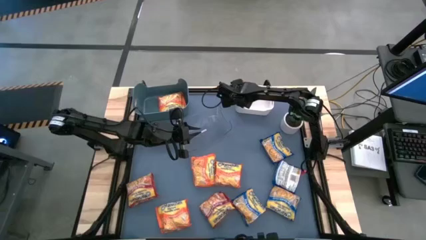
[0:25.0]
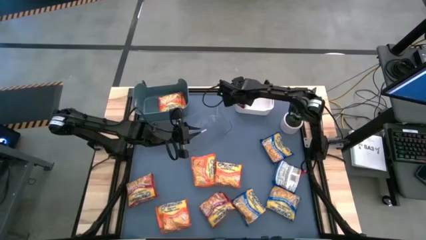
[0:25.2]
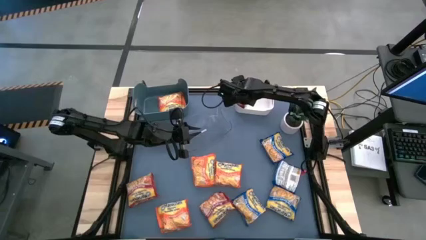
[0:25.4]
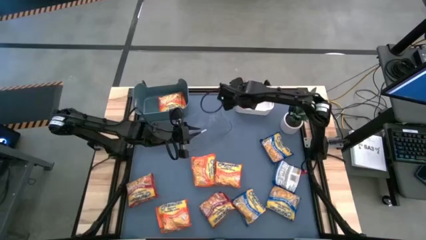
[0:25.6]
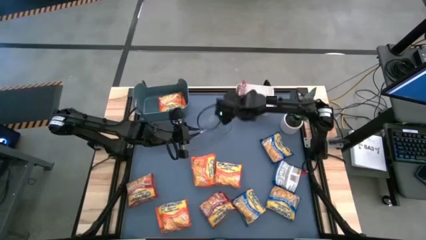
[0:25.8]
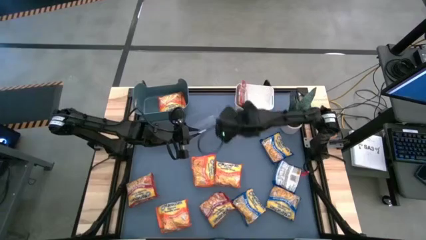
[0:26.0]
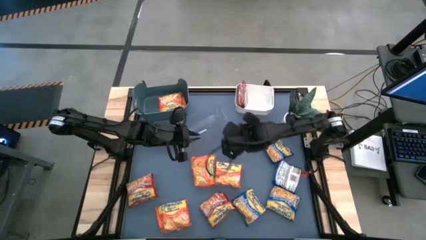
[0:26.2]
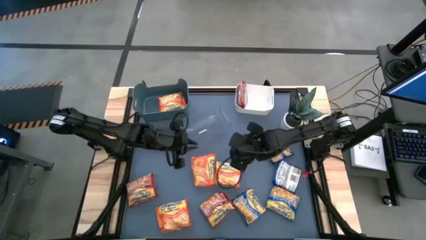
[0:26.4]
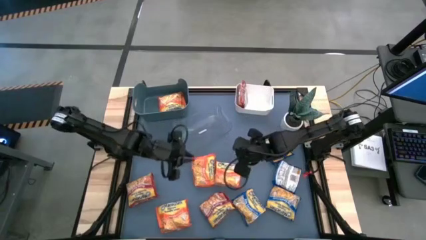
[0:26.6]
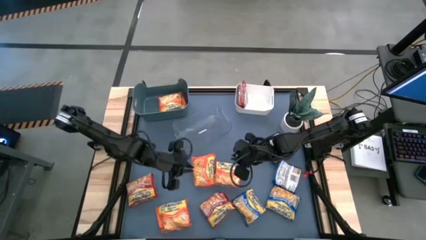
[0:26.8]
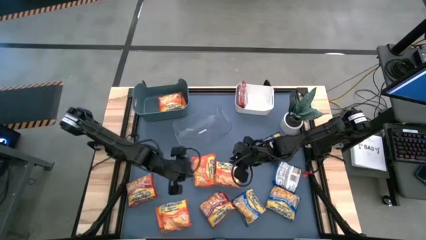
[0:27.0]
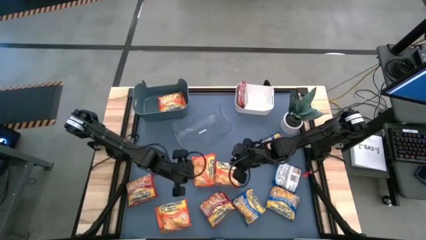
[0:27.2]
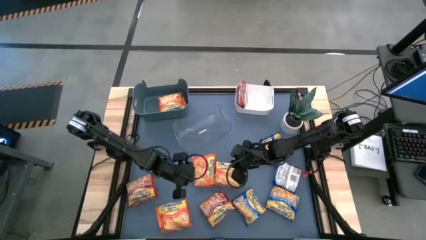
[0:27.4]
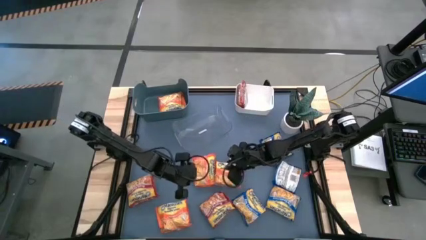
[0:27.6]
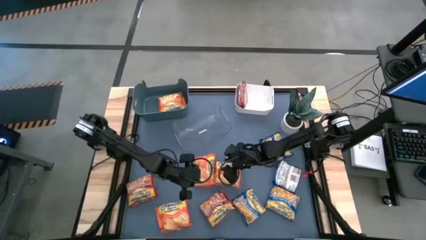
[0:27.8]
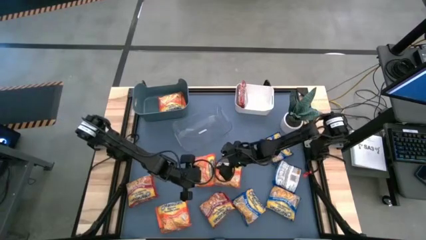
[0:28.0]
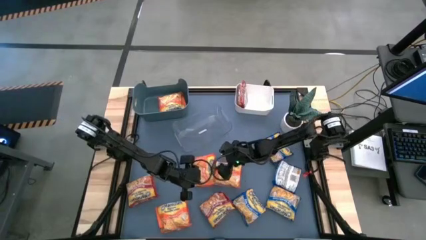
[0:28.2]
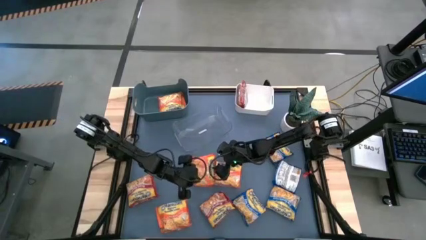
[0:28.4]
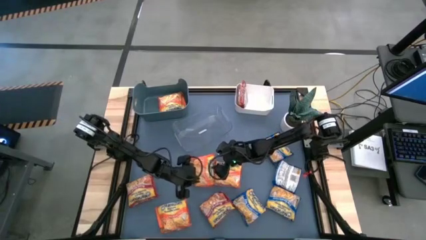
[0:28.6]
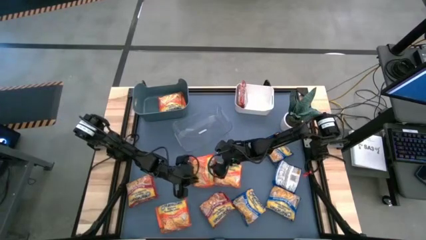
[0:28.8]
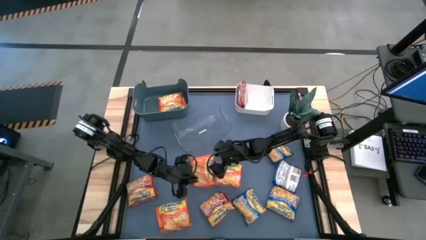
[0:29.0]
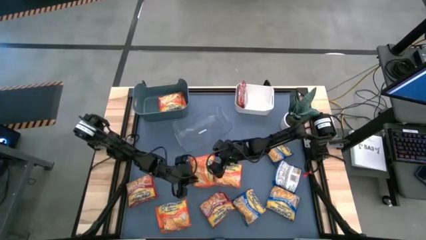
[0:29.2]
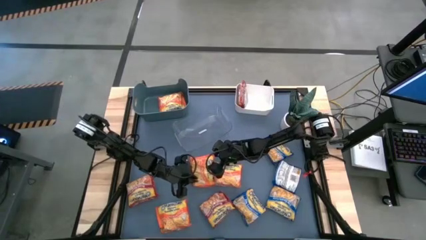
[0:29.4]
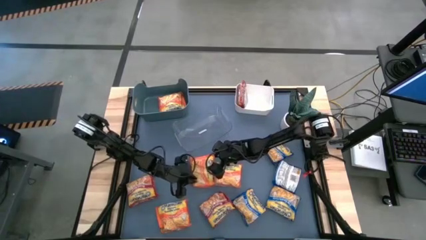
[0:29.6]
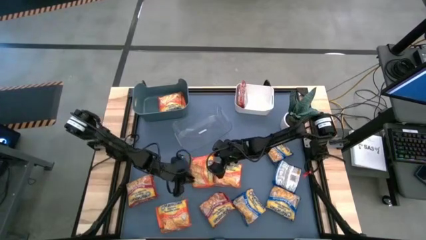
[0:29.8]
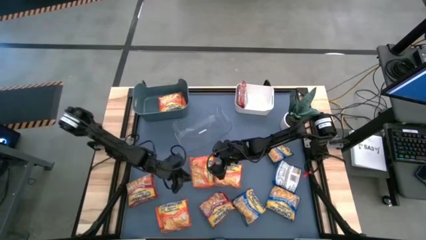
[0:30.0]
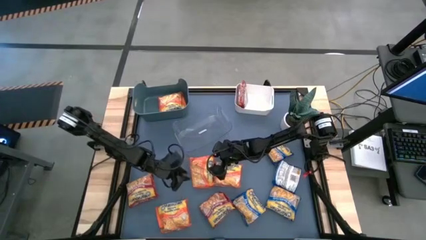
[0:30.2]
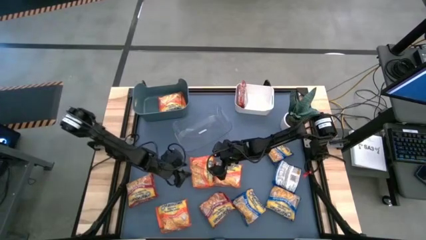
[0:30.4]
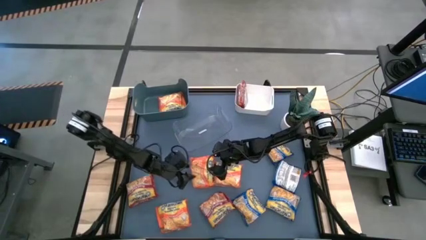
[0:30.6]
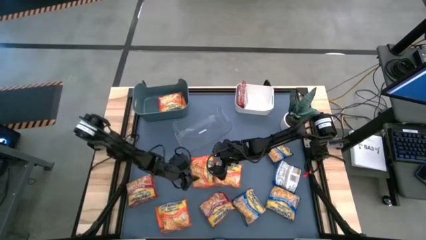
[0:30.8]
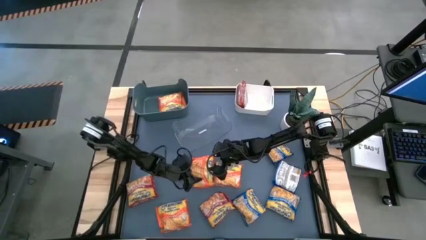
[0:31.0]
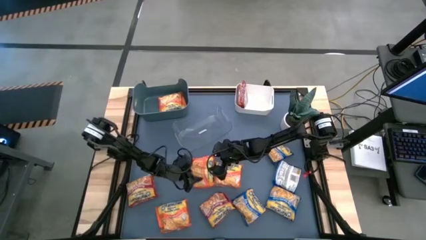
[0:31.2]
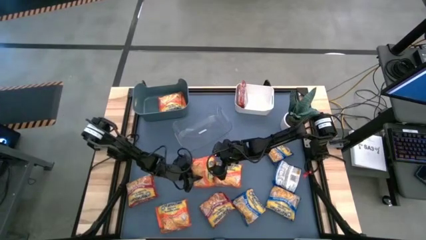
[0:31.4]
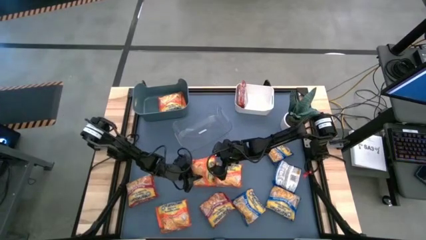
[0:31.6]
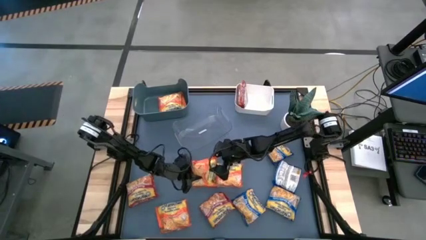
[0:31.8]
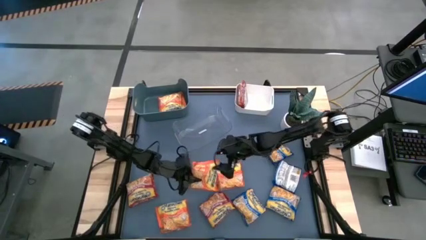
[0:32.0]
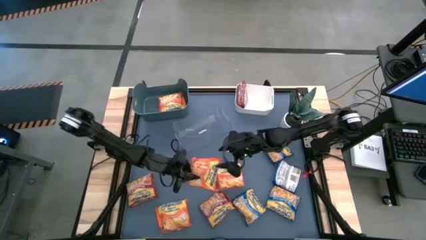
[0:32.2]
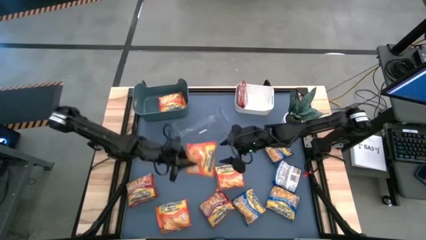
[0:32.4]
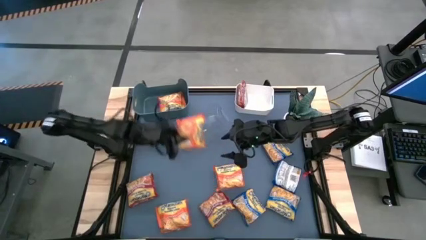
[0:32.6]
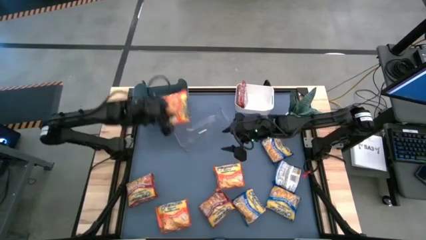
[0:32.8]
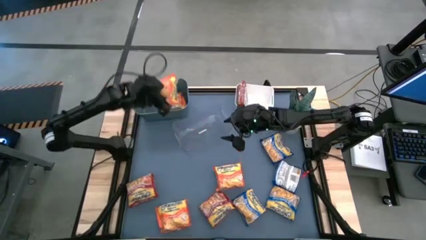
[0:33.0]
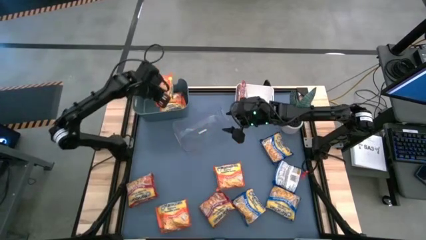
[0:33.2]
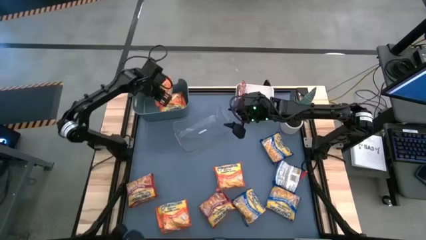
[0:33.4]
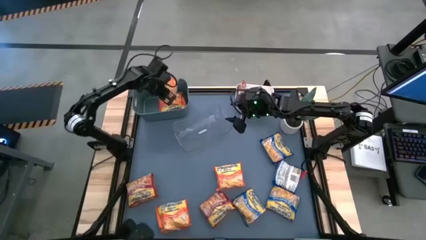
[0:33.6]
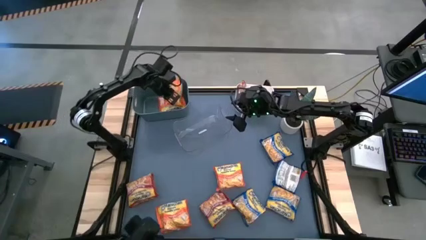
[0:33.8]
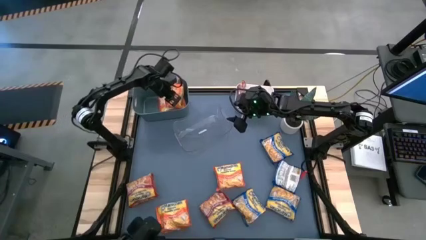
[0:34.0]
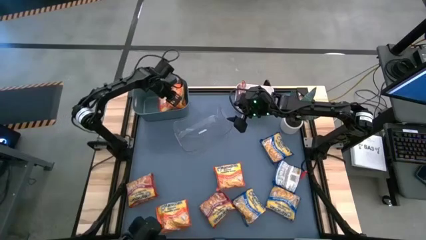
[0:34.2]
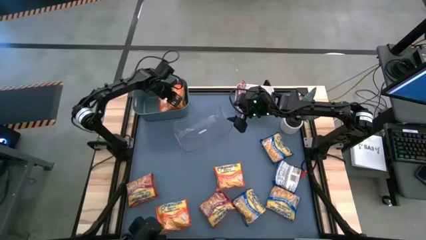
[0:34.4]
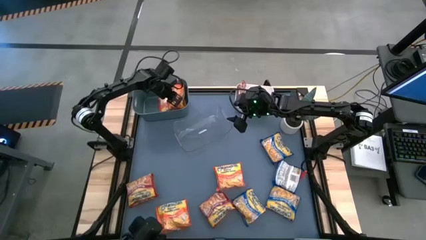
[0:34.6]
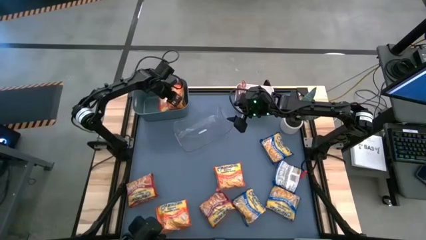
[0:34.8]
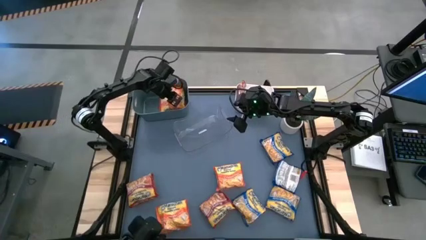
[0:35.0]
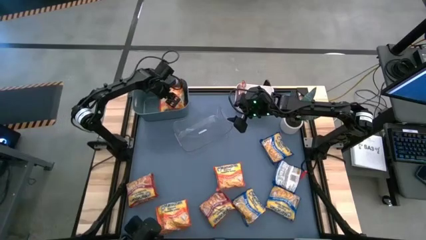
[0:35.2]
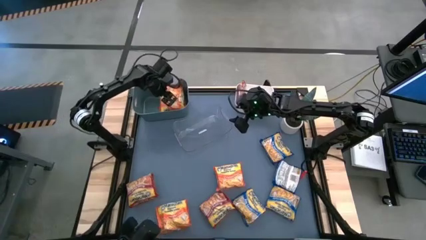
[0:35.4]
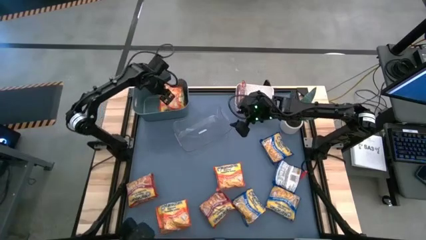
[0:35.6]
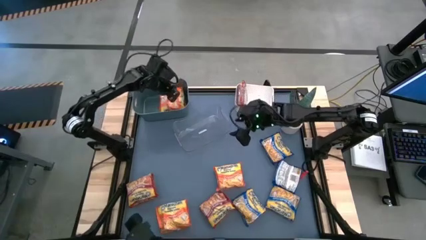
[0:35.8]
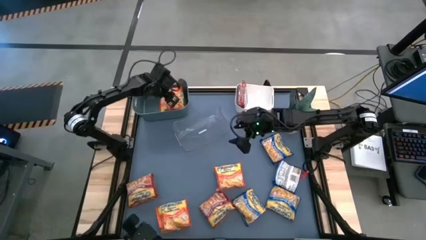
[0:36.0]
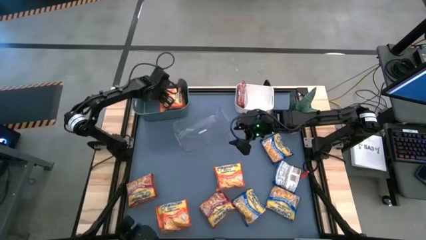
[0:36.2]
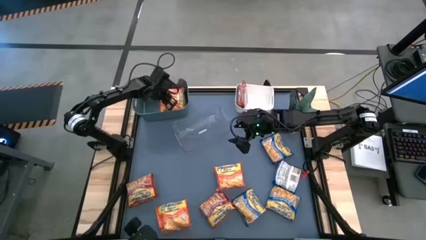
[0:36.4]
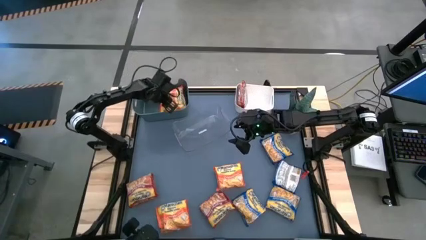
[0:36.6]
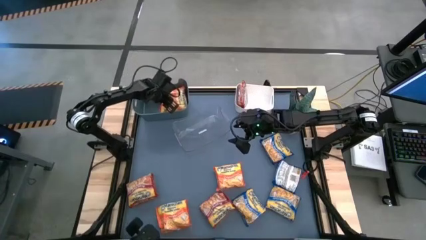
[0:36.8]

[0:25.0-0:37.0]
Task: Sort Maruchan noodles
Put the orange noodle pack into the blue bin

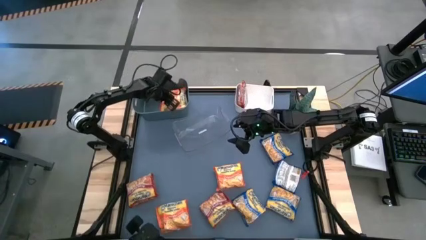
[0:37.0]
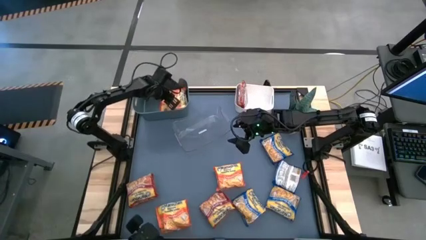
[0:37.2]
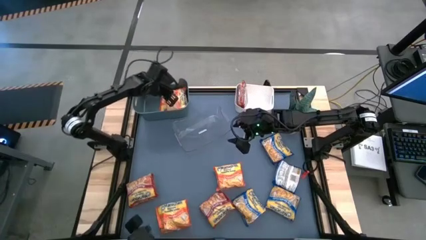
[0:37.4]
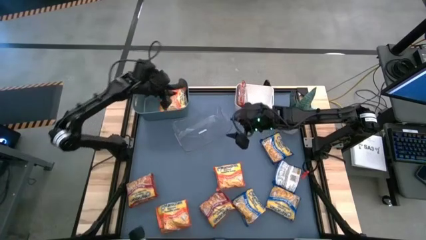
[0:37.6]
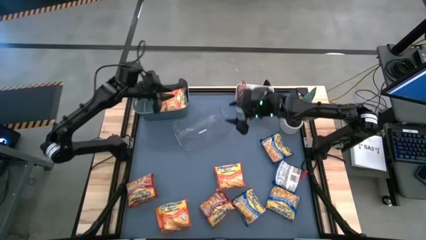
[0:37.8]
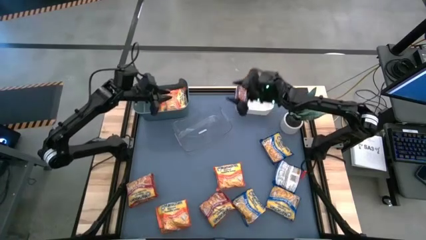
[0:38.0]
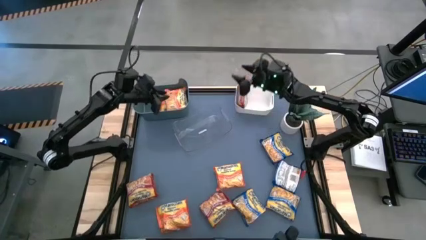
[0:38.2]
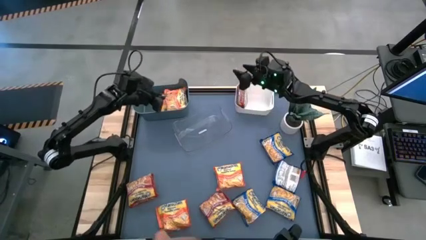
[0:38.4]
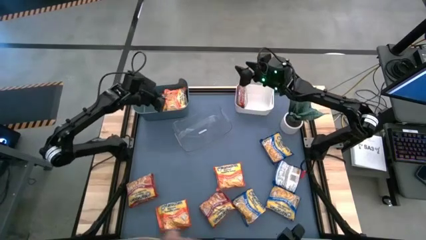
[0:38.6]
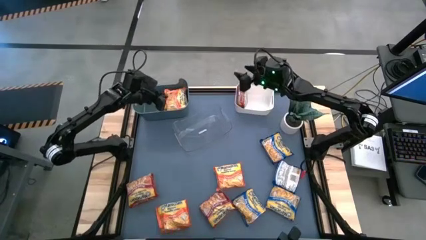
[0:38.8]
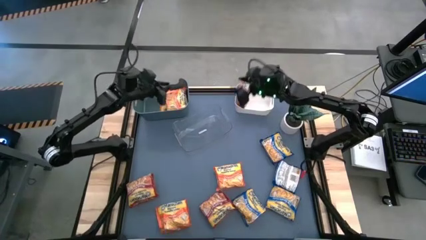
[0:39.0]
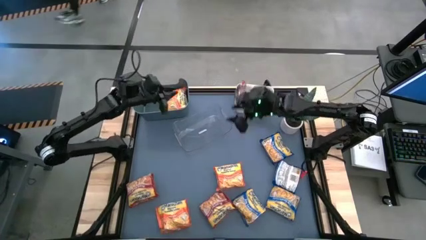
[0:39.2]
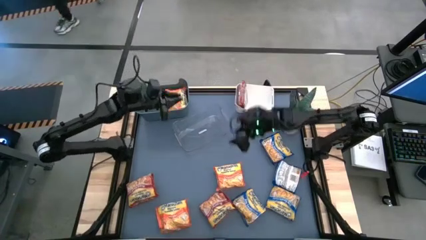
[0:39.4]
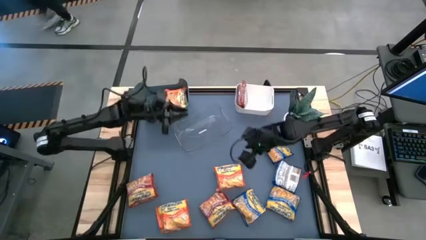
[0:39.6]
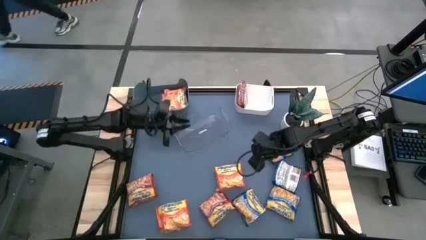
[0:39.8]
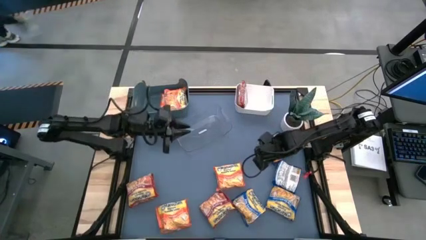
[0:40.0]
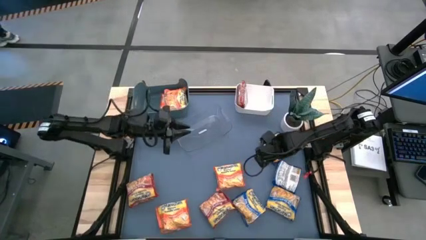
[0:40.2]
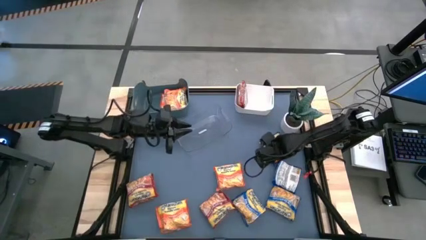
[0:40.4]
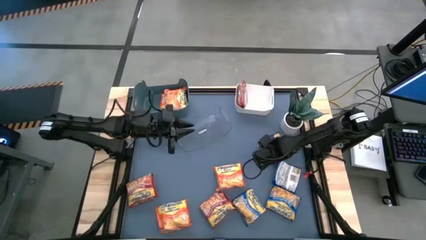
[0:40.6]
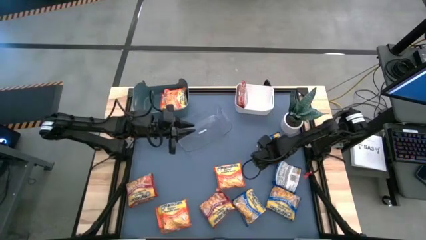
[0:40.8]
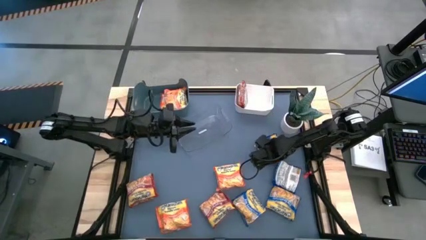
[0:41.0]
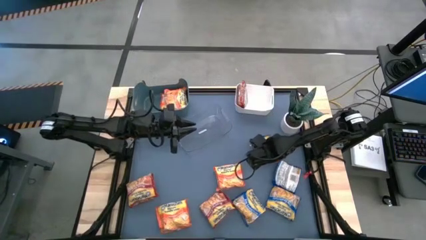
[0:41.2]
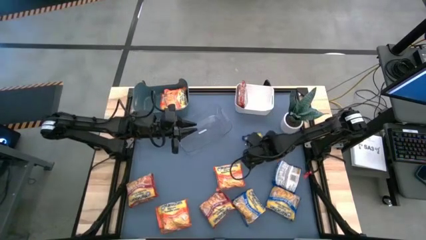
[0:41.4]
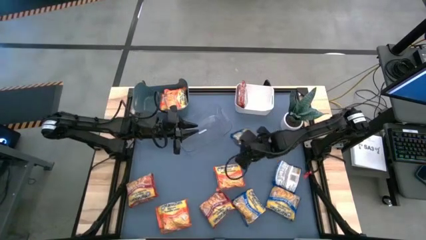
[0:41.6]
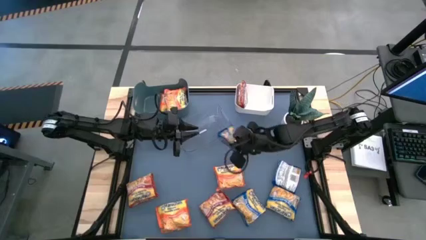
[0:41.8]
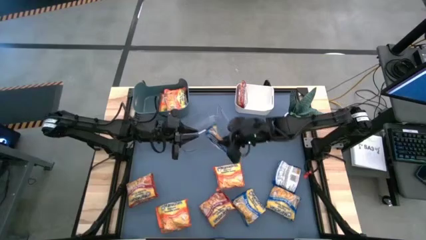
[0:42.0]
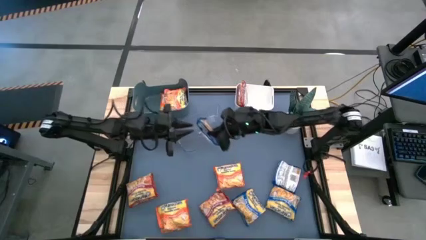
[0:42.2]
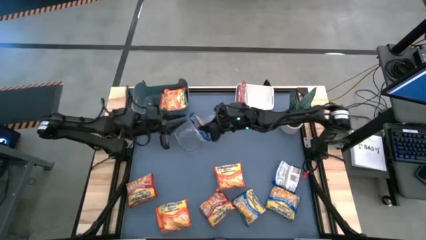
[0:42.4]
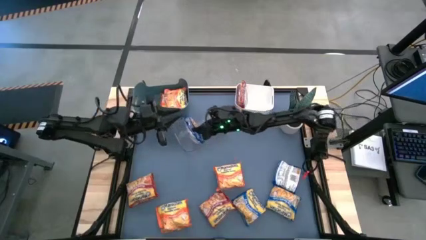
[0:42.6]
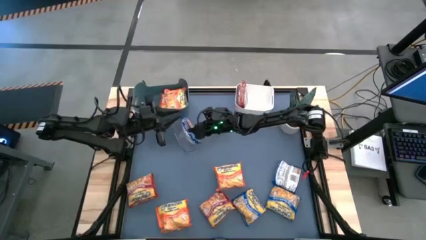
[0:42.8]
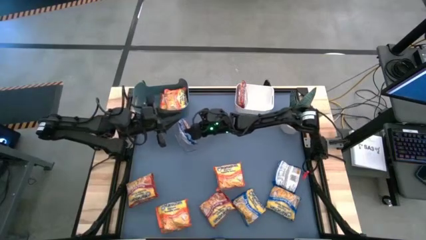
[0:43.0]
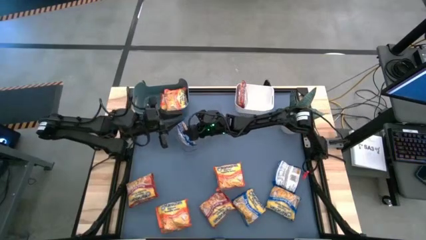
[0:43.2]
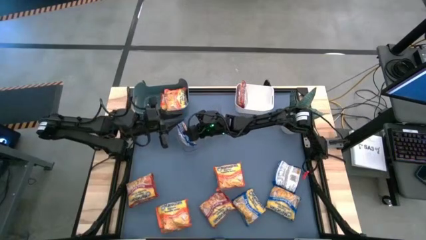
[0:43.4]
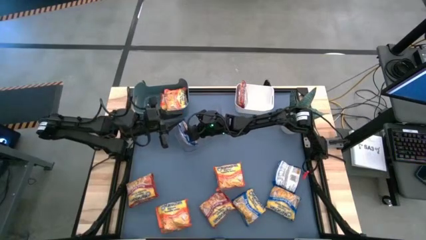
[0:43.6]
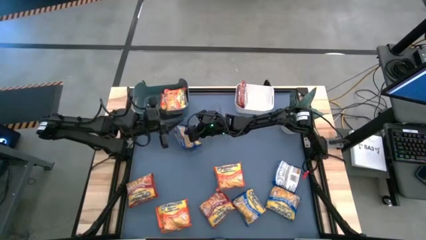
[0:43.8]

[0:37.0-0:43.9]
Put the blue noodle pack into the transparent bin
